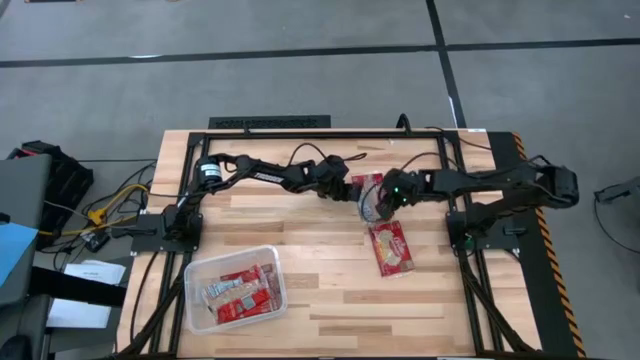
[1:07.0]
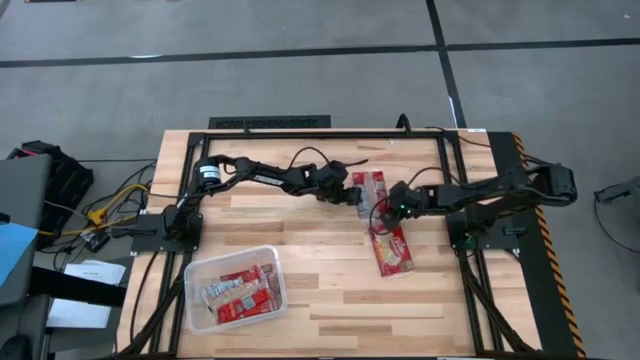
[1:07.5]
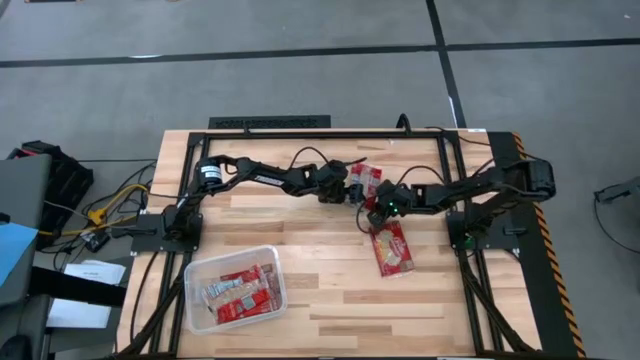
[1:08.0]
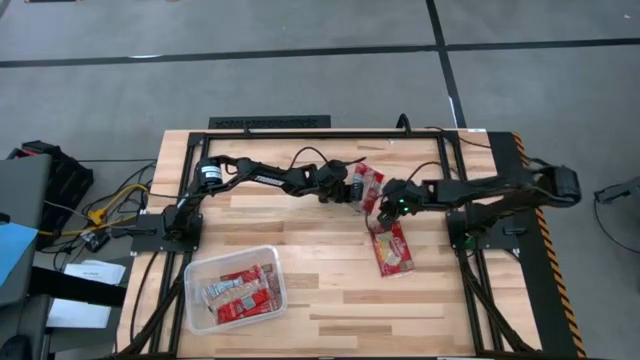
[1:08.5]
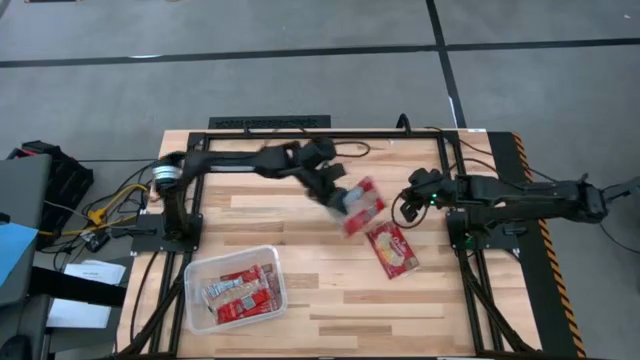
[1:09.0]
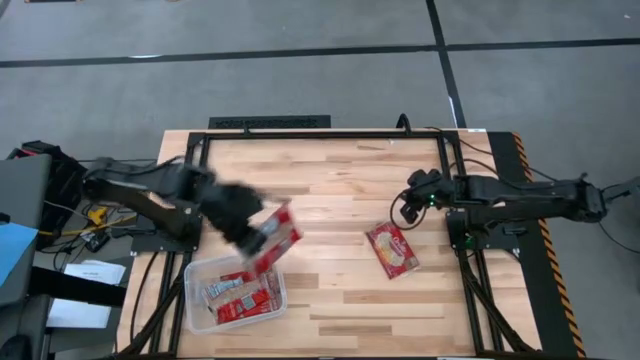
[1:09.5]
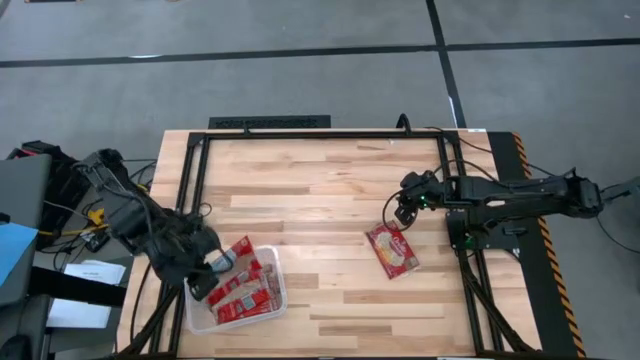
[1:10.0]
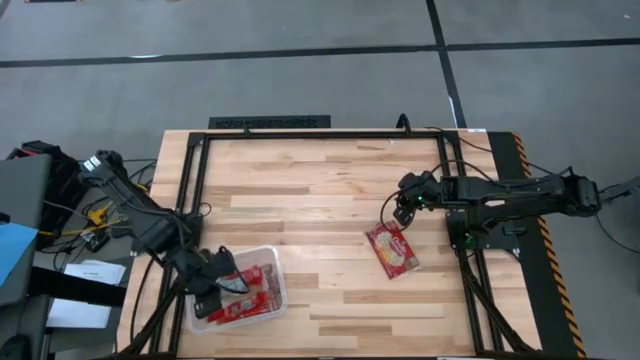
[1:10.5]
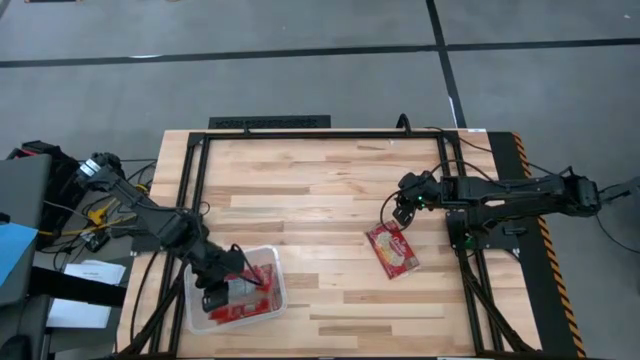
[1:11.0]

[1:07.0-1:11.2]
Task: Sort popcorn bags into baskets
Put the red popcorn bag into the transparent bin

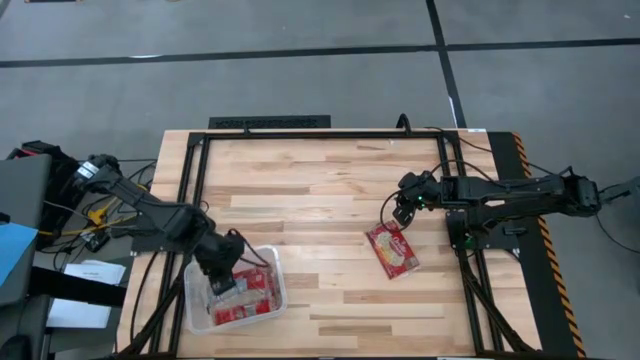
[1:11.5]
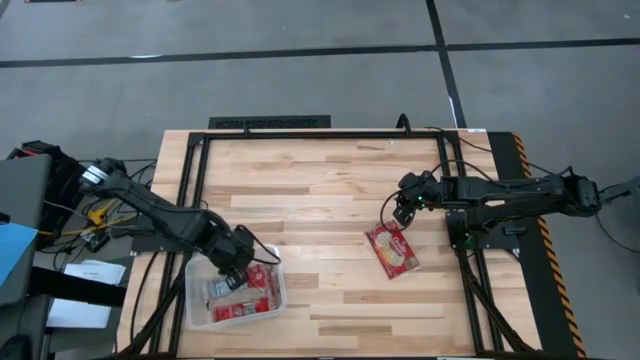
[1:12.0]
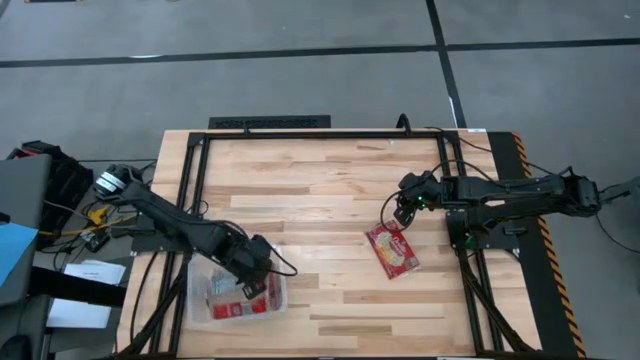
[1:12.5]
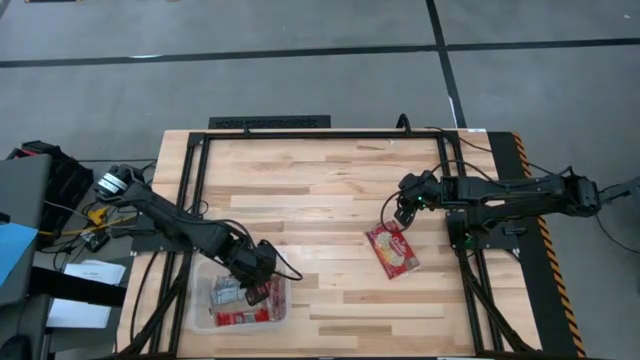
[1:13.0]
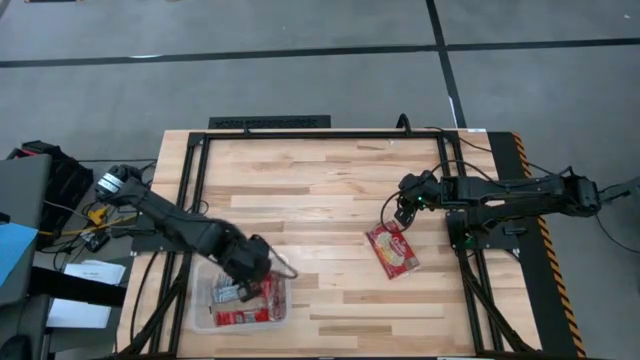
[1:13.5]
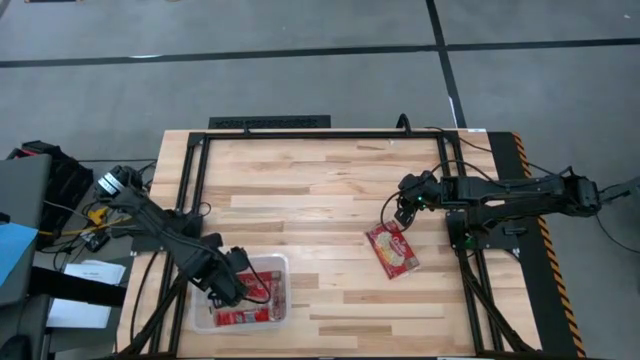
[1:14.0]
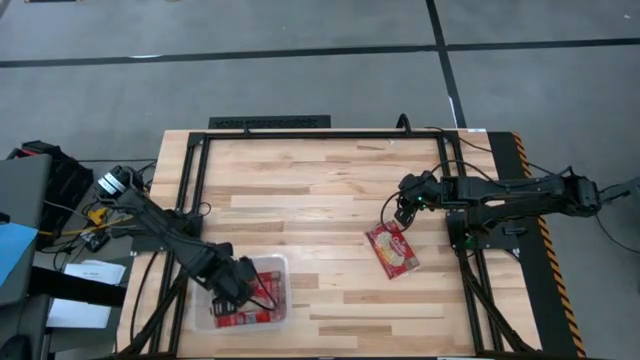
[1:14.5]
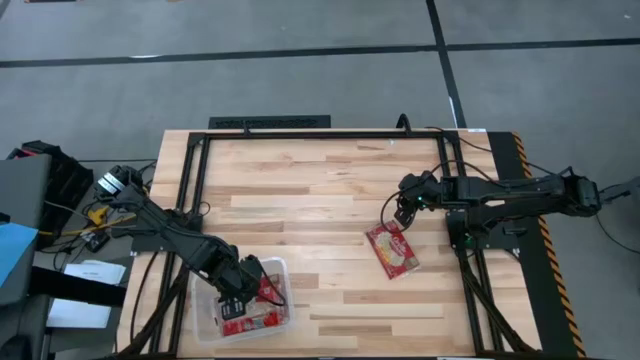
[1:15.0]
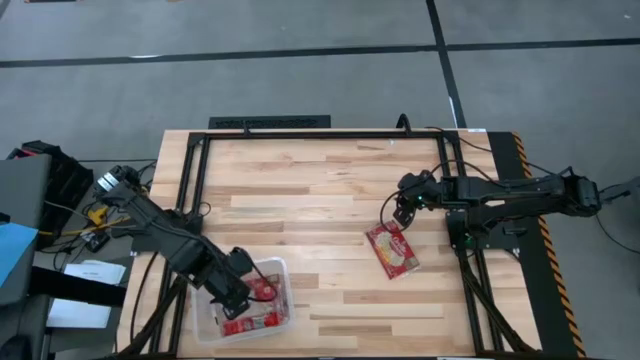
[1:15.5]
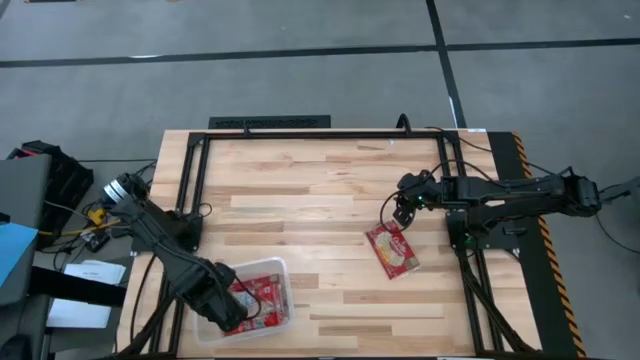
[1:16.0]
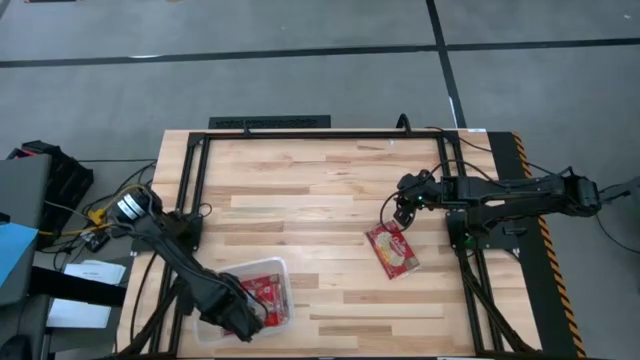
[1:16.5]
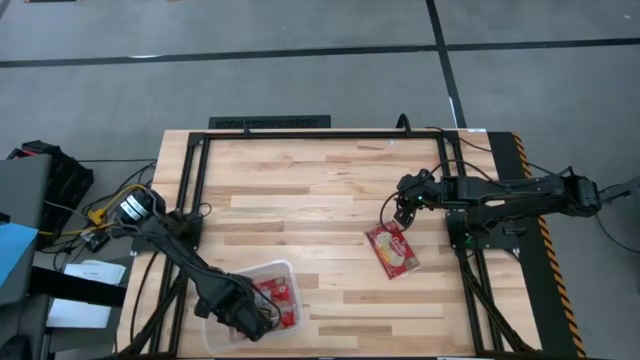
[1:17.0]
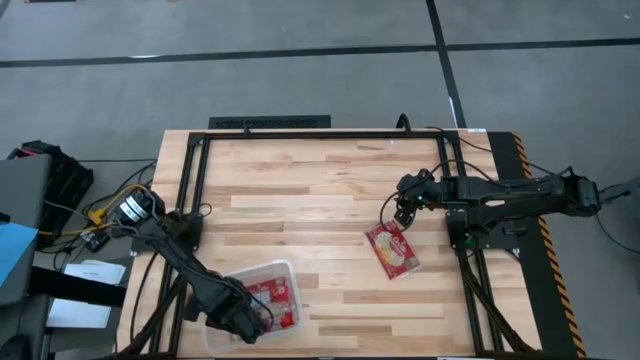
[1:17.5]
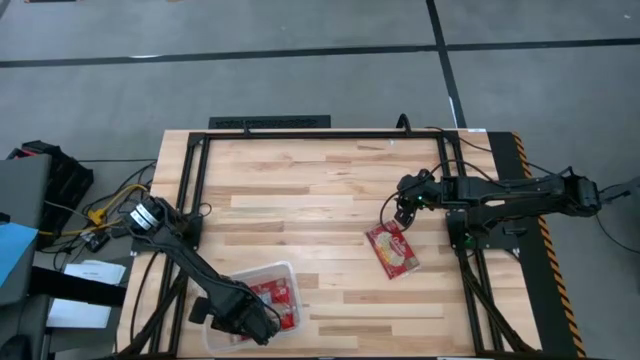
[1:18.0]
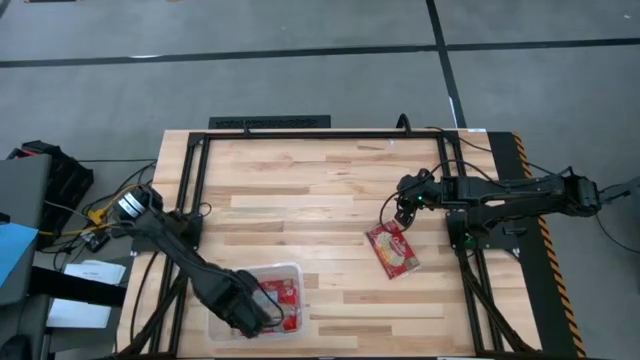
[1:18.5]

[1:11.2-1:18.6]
Adjust the popcorn bag in the transparent bin

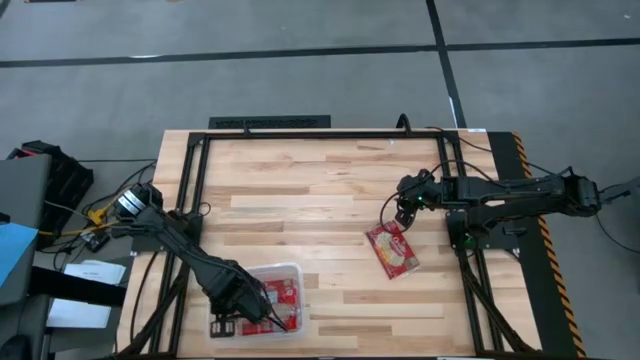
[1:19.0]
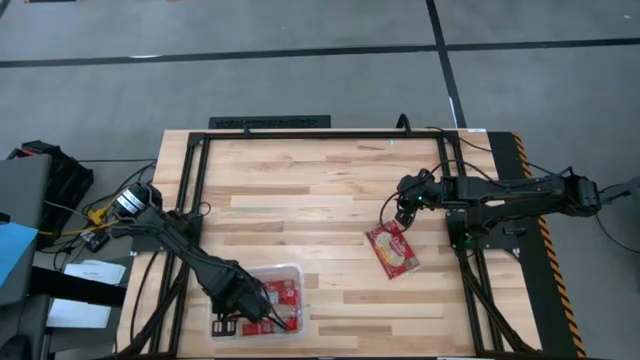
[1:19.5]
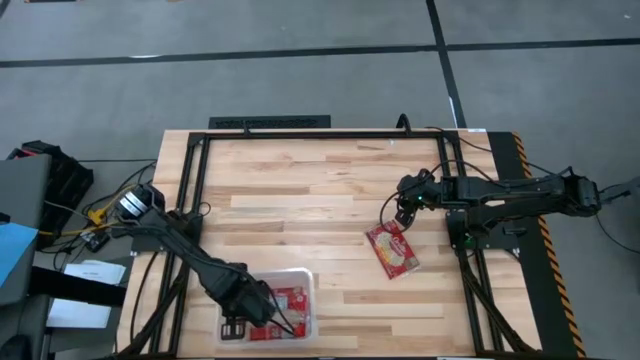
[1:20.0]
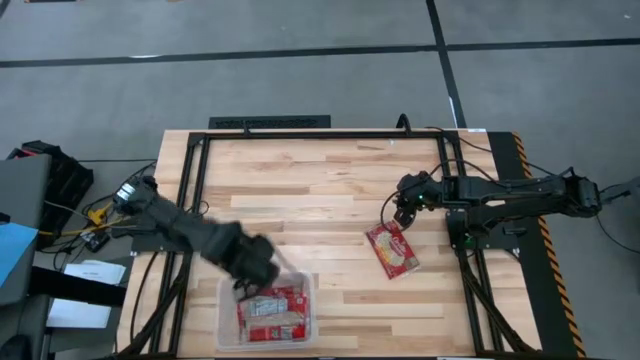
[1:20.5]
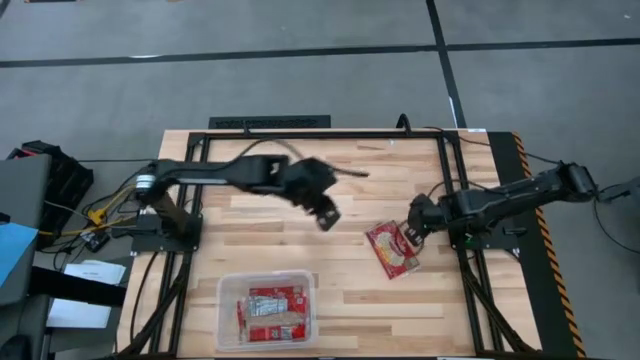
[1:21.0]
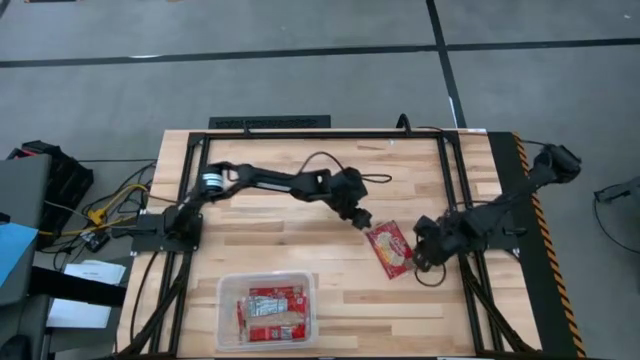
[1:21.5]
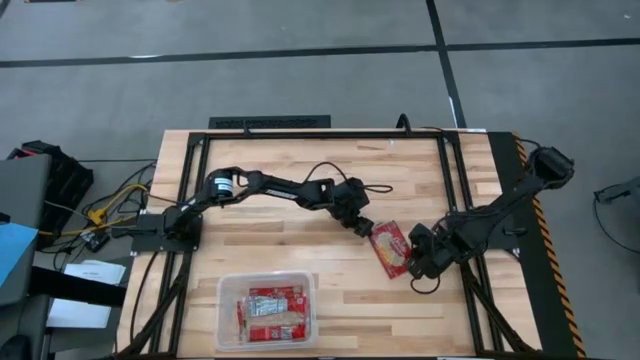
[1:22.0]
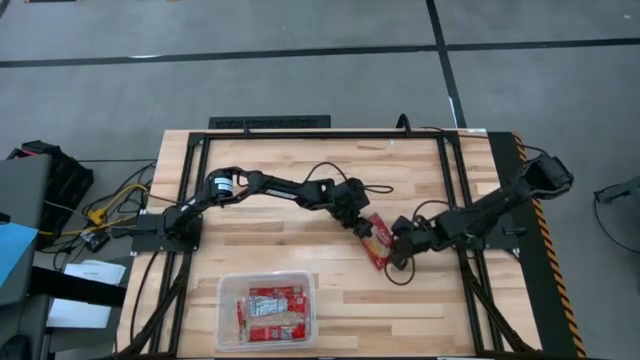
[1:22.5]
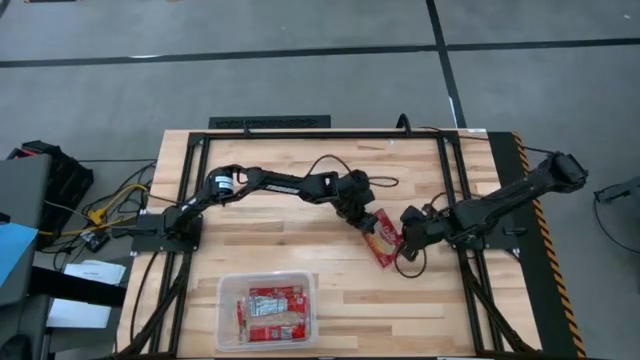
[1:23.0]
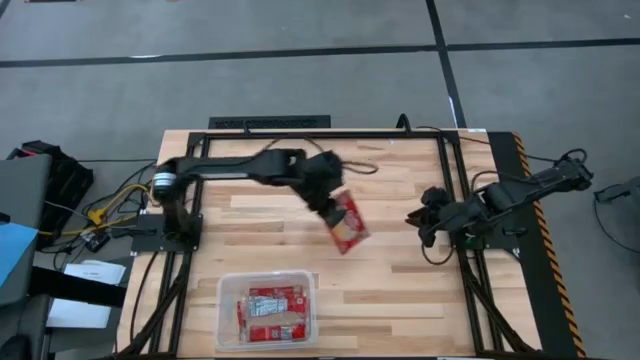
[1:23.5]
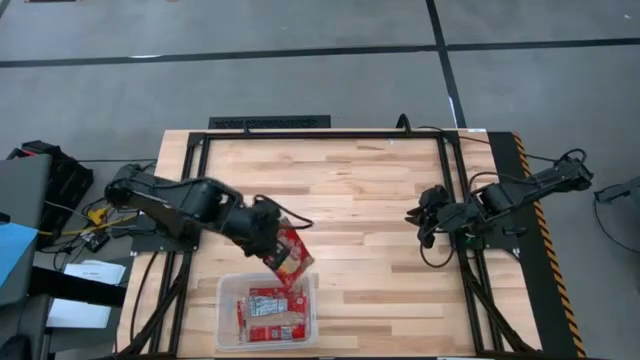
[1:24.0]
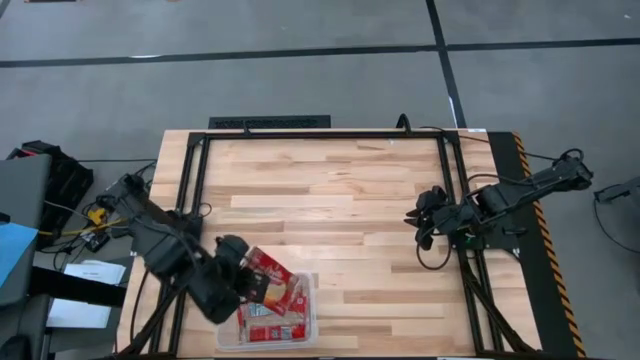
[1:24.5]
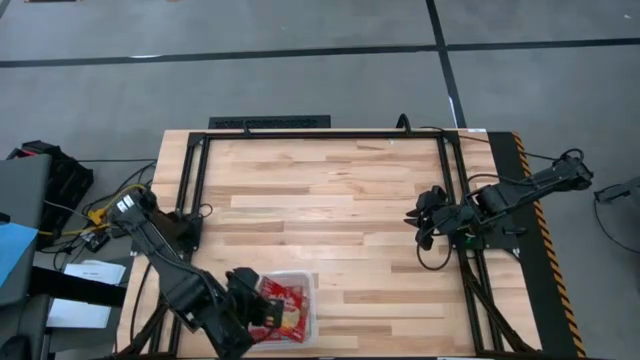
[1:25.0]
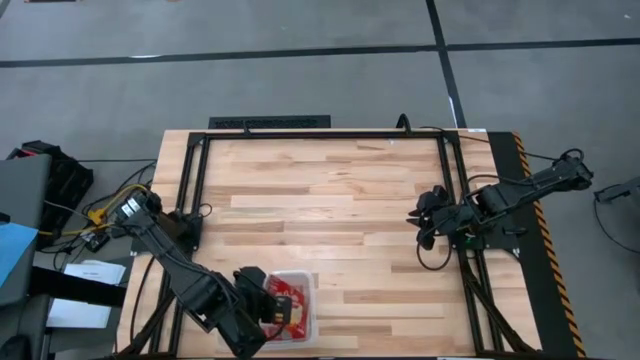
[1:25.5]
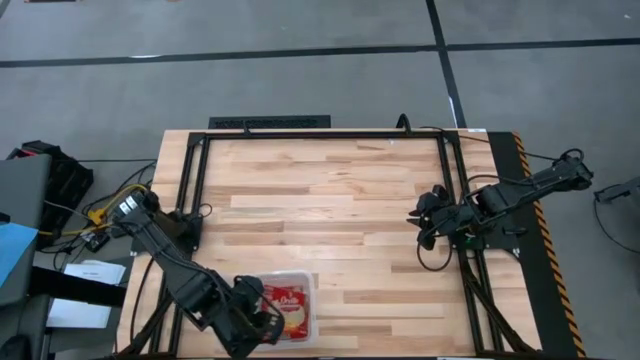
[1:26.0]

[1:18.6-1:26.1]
Put the red popcorn bag into the transparent bin

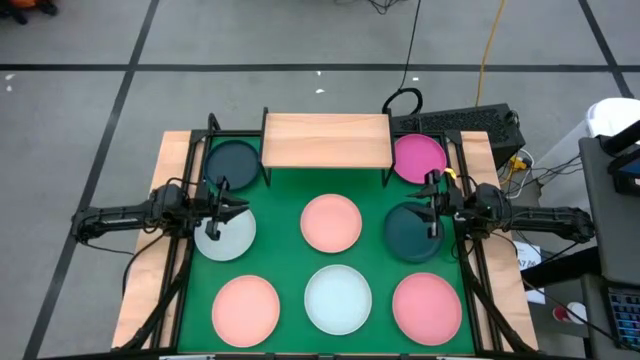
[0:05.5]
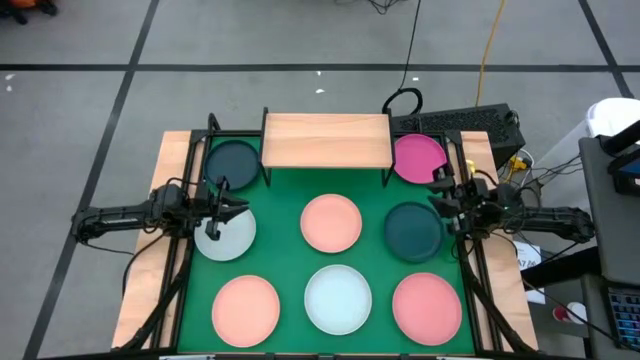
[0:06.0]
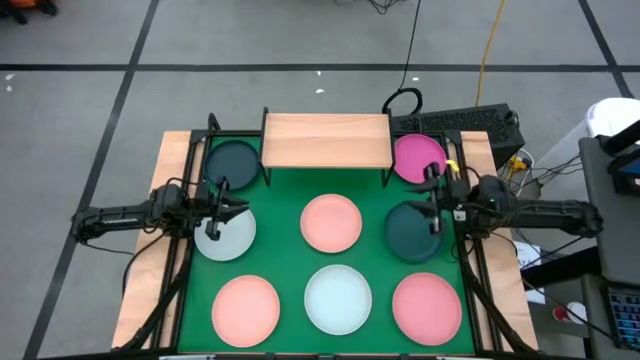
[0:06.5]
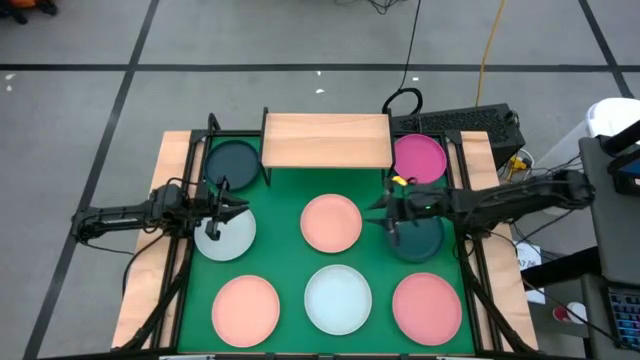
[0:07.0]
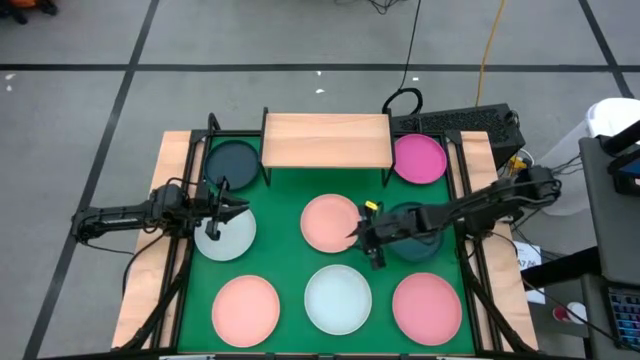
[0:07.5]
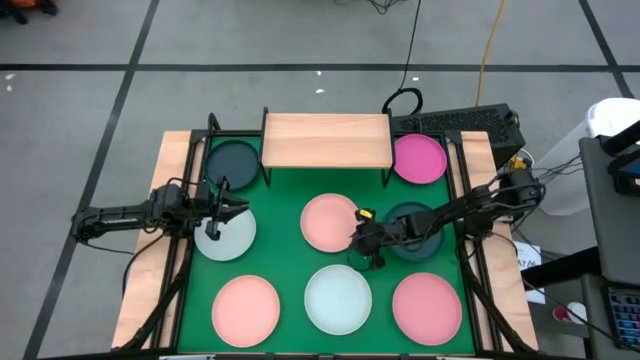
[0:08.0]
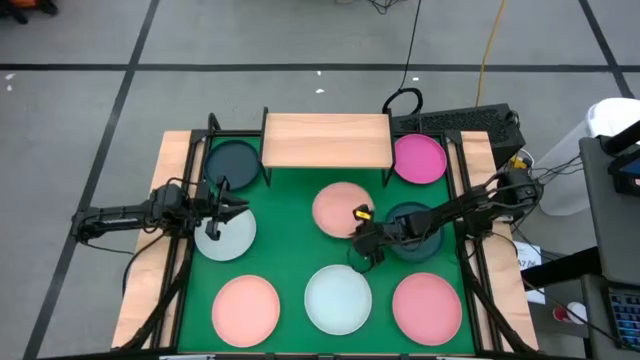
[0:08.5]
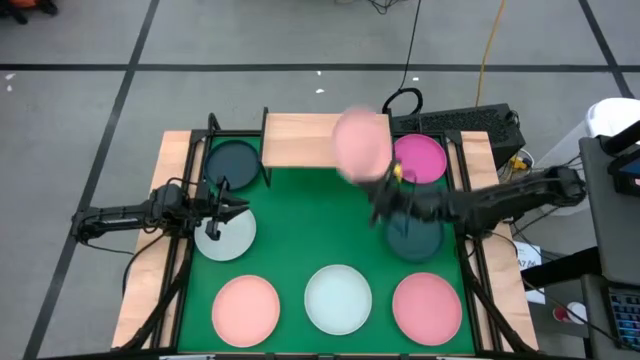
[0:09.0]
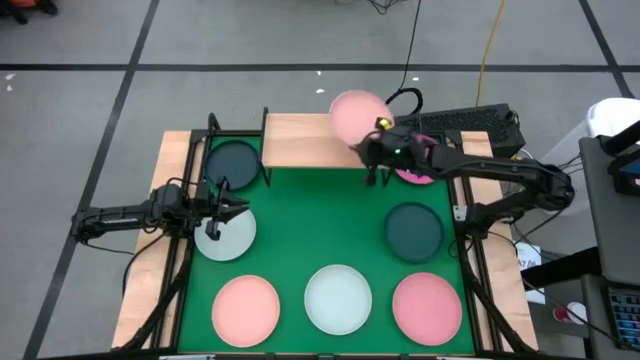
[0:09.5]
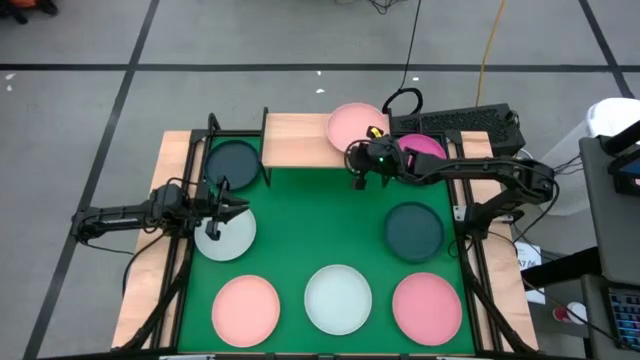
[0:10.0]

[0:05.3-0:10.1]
Task: Place and stack plates onto a shelf
Put the top light orange plate on the shelf
